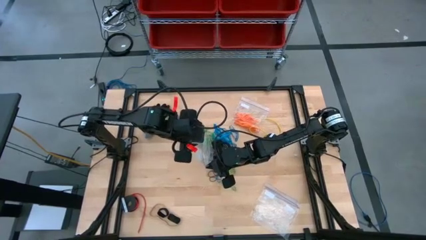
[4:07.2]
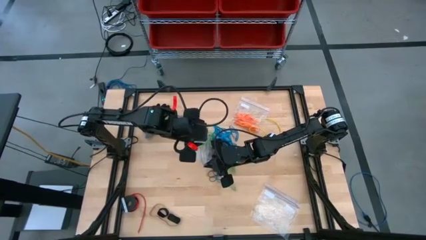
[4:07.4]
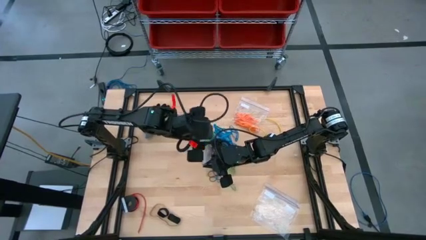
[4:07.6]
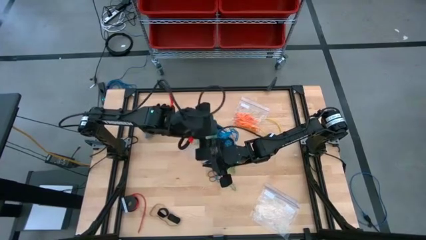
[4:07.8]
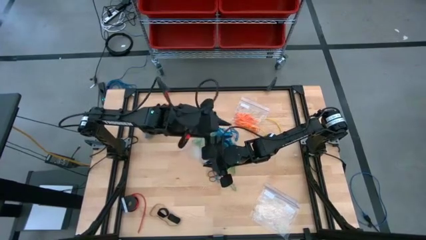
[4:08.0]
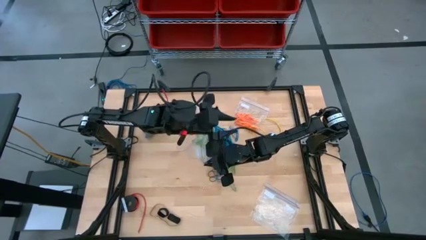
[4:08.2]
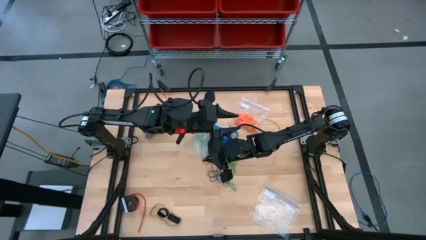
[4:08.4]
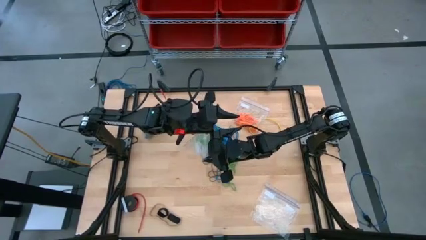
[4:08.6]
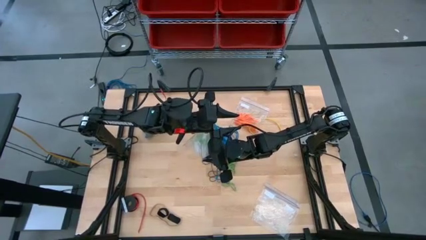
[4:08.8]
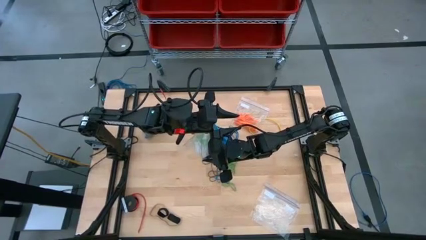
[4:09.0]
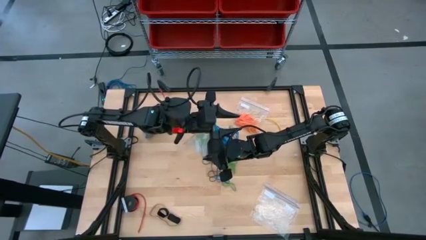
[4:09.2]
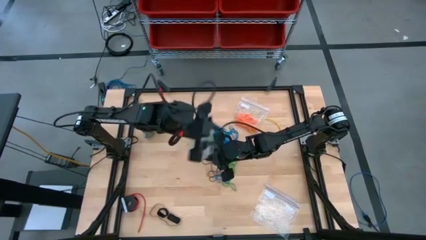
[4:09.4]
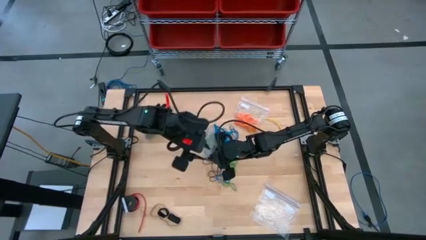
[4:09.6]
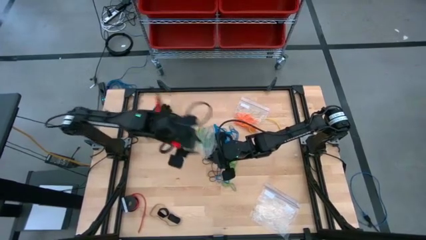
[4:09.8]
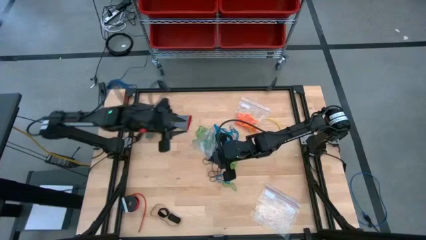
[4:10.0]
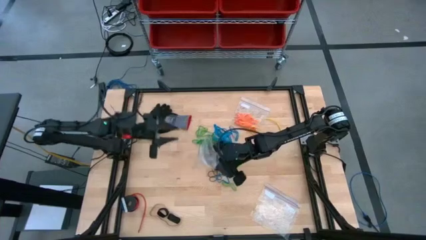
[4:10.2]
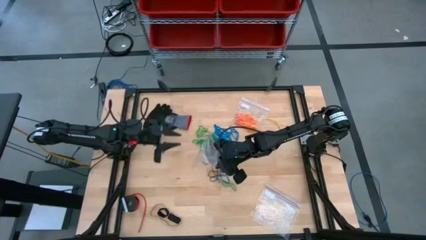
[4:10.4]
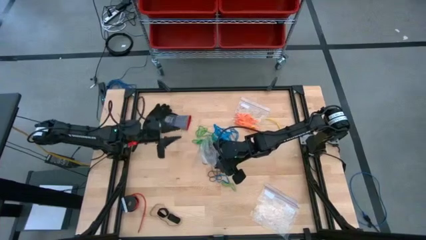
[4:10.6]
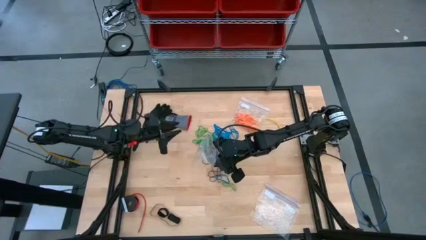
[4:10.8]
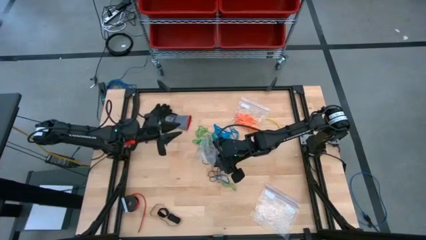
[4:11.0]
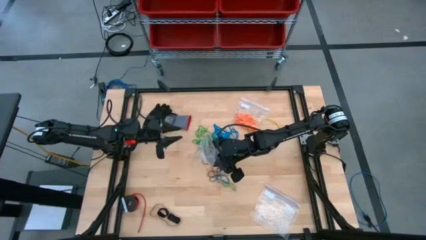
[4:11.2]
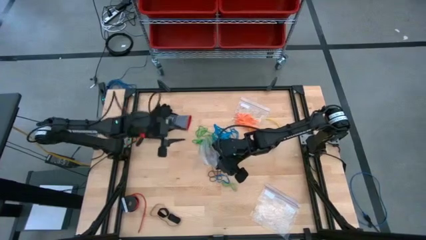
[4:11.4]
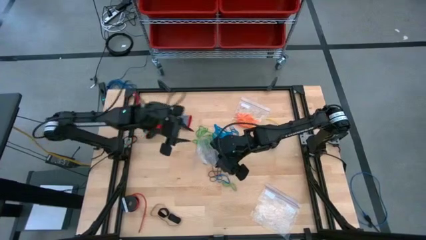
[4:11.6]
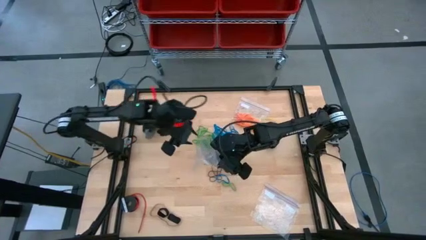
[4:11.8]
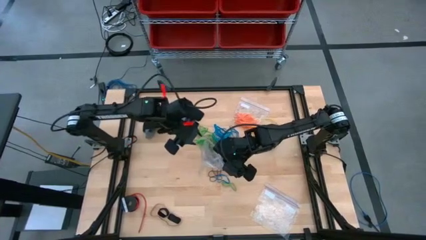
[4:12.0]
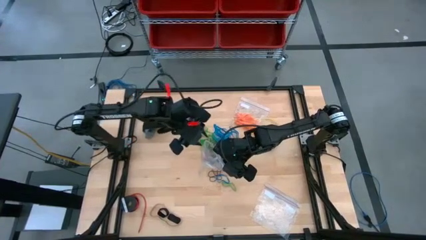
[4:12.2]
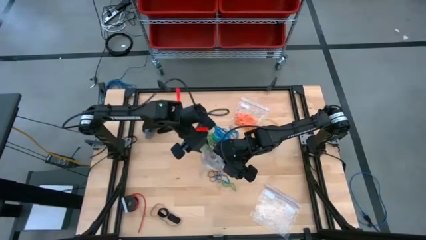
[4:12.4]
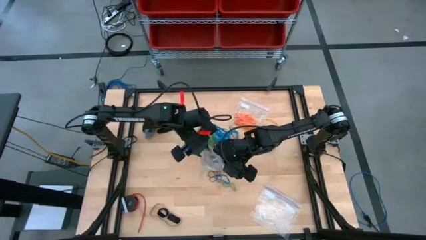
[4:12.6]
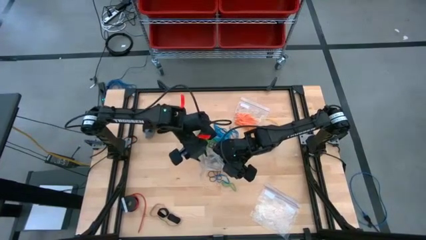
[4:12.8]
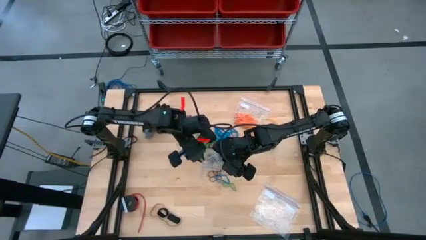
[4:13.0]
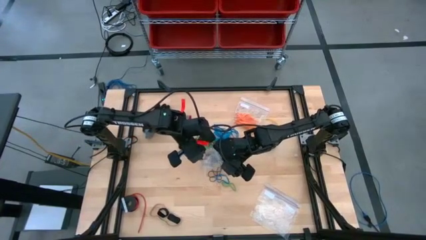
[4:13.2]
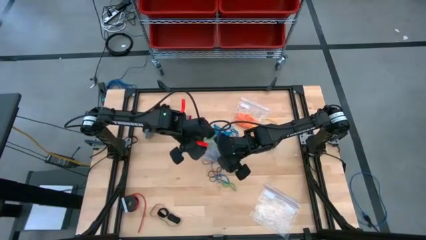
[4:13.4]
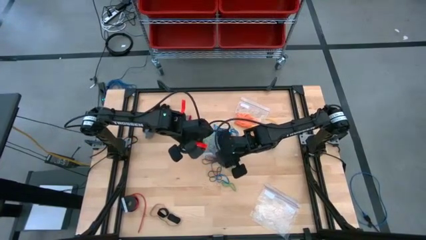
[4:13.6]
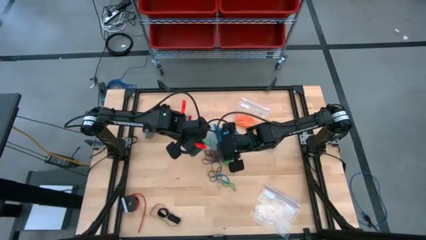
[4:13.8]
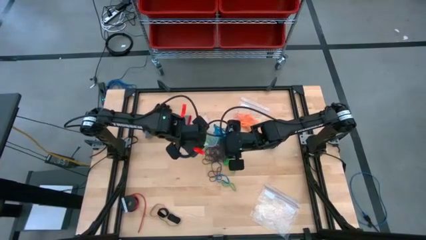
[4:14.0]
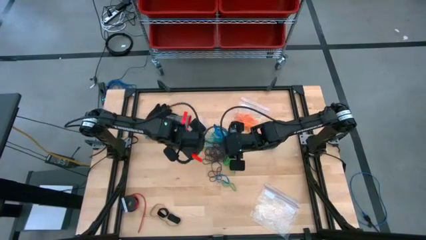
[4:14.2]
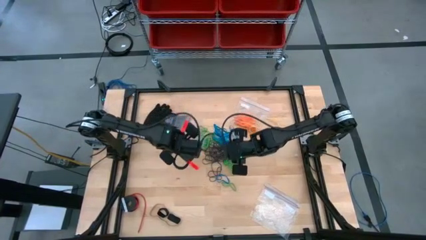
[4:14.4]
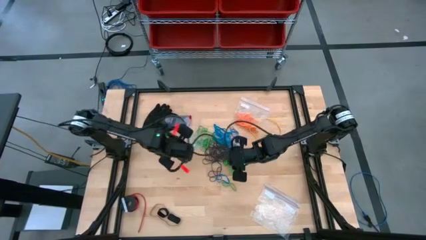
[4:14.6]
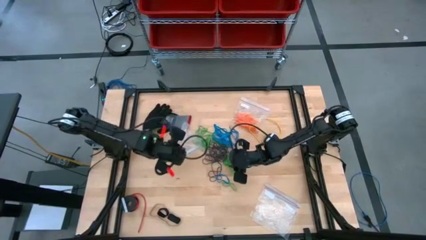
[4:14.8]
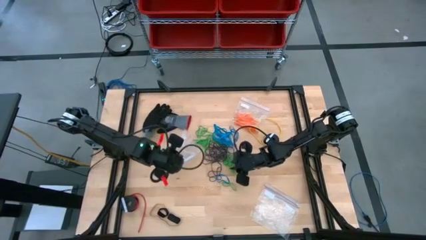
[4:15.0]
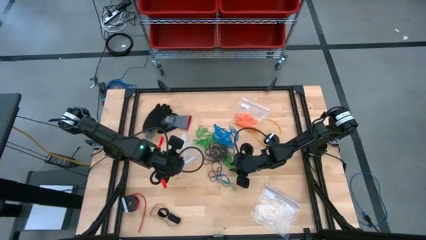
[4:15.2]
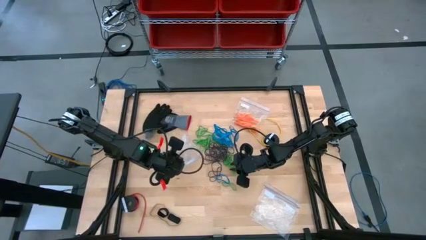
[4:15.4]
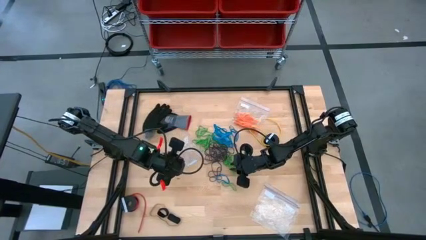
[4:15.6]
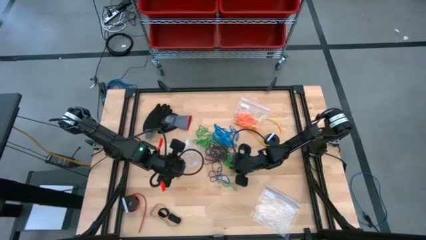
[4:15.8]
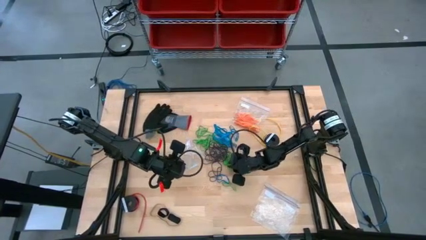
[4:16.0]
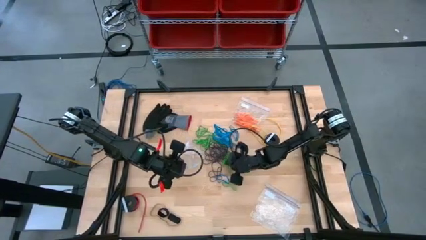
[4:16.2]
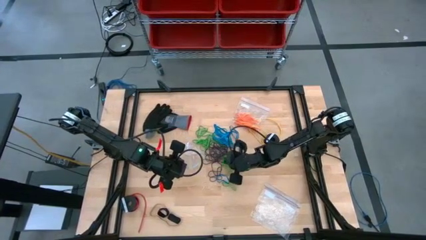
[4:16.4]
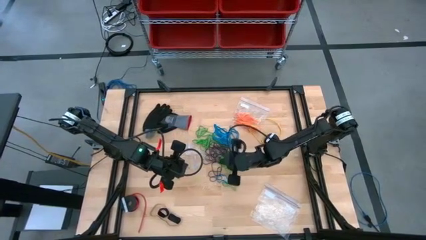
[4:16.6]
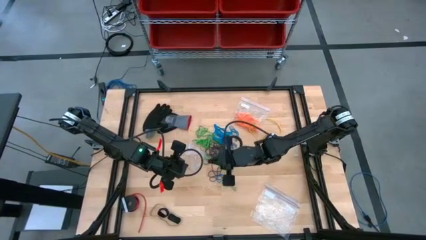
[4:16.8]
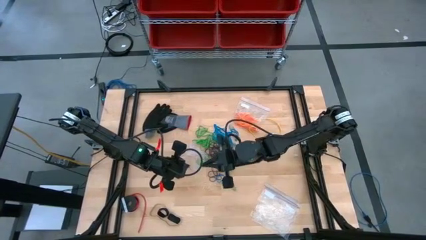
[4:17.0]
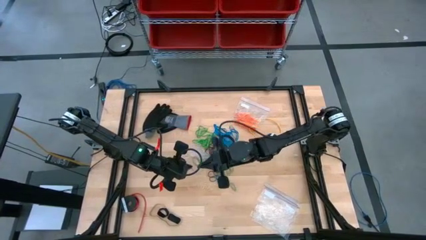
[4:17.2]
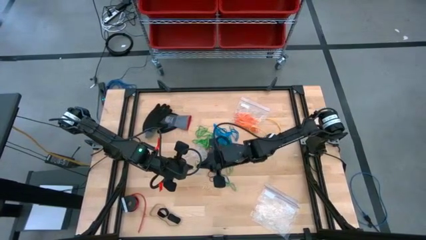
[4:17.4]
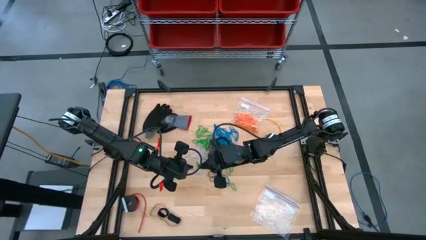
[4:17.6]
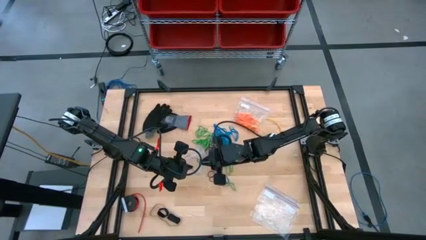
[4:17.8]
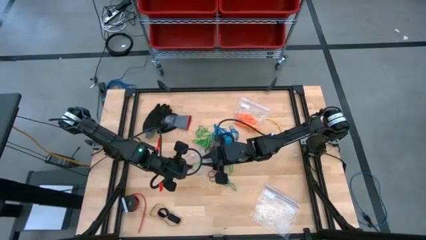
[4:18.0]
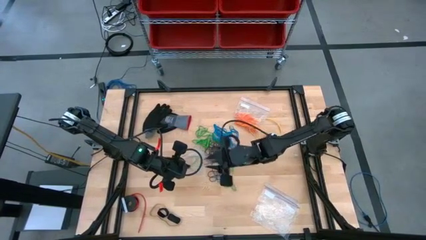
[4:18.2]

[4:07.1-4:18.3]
Task: Sort rubber bands
Put the green rubber band into the transparent zip bag

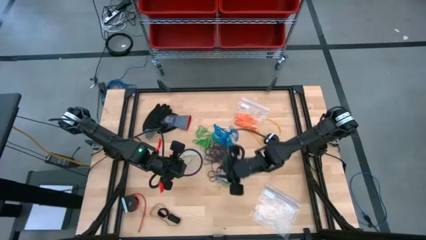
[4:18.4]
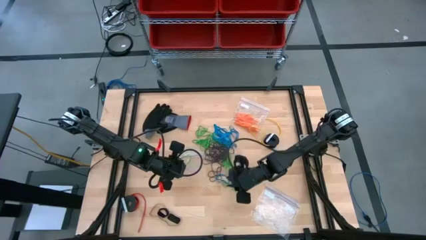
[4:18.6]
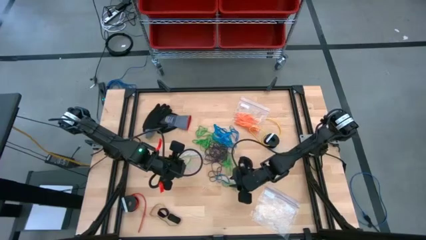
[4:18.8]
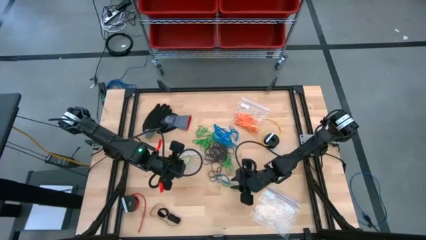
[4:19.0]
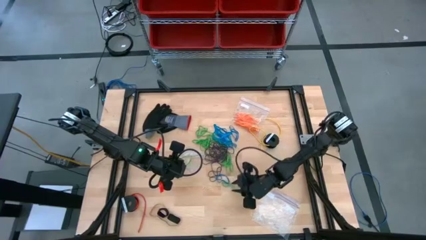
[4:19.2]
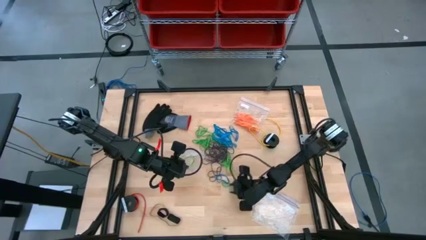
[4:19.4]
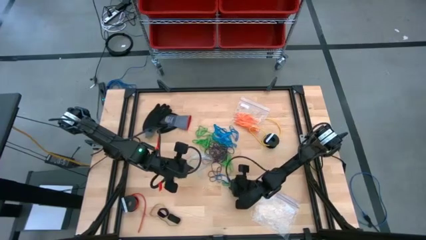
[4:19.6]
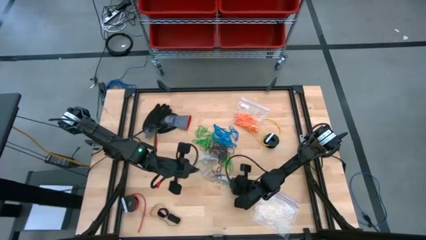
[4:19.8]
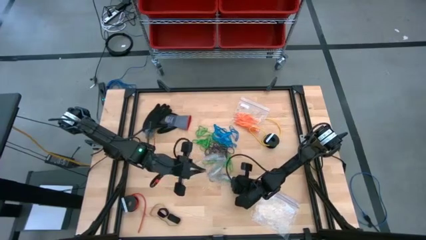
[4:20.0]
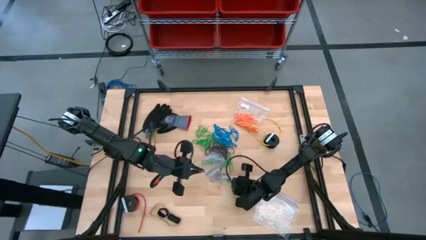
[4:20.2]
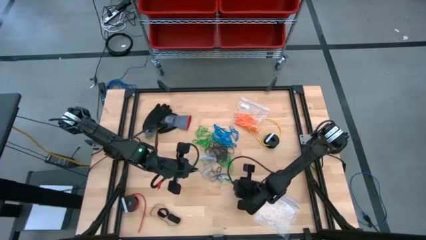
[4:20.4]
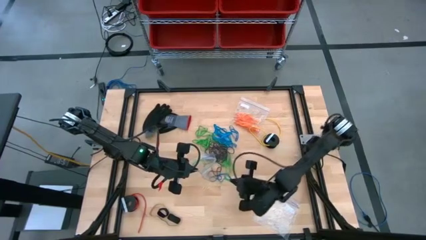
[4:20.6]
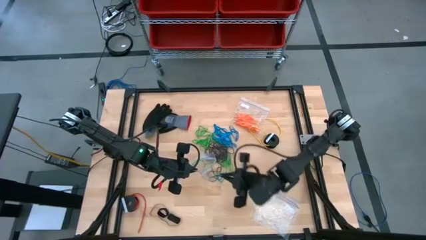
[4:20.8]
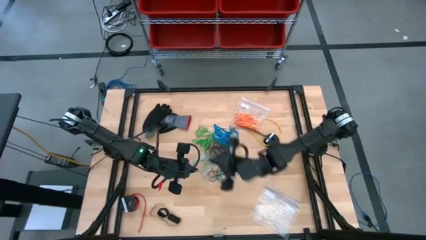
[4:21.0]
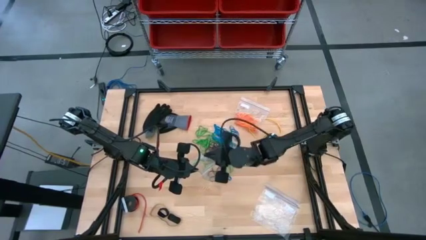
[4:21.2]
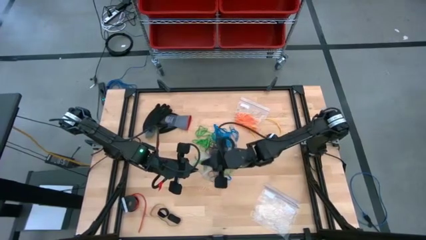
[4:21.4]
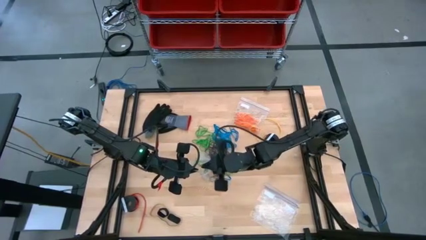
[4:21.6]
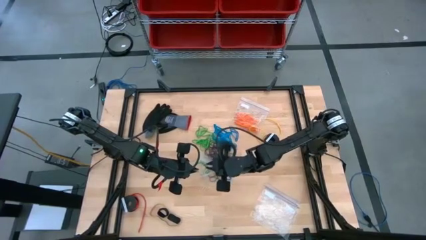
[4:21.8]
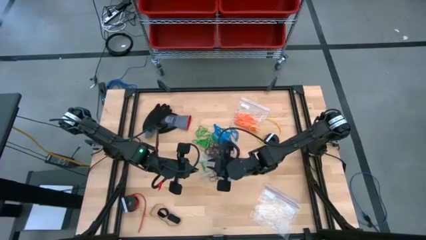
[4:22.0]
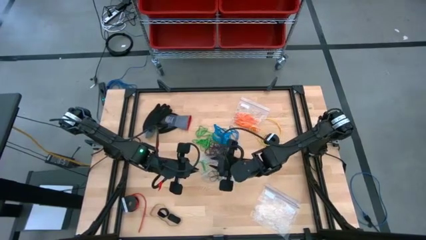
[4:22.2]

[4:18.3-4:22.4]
Put the green rubber band into the transparent zip bag

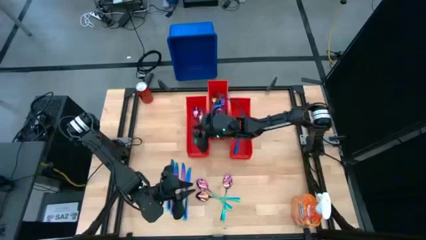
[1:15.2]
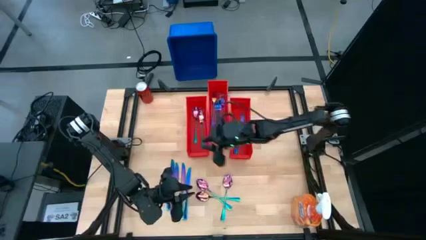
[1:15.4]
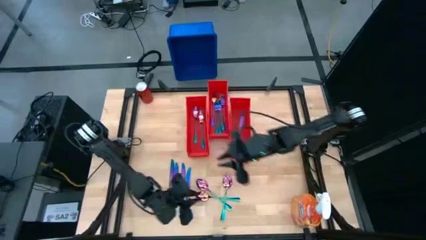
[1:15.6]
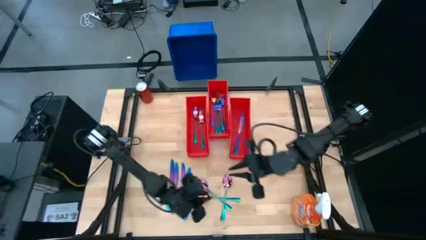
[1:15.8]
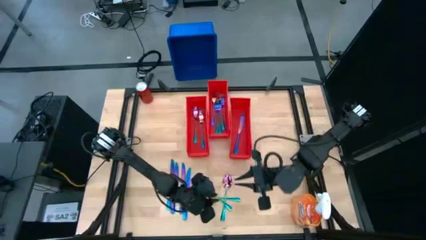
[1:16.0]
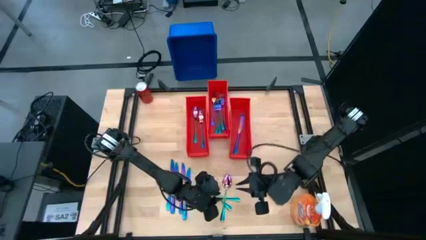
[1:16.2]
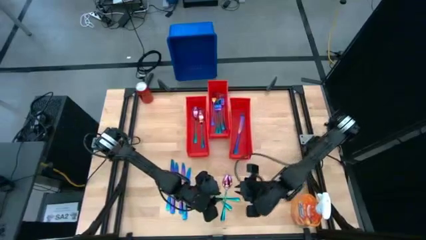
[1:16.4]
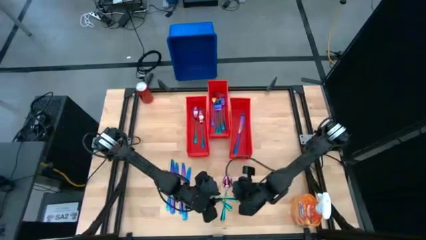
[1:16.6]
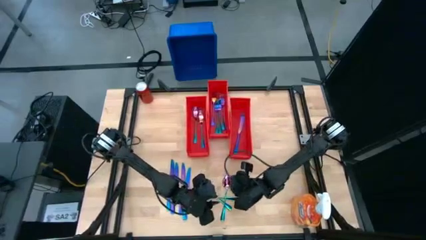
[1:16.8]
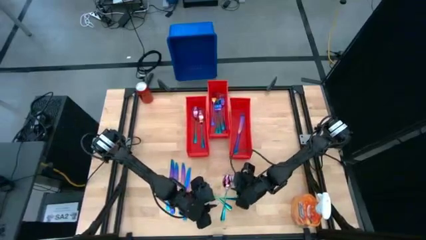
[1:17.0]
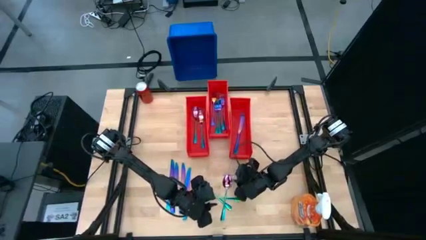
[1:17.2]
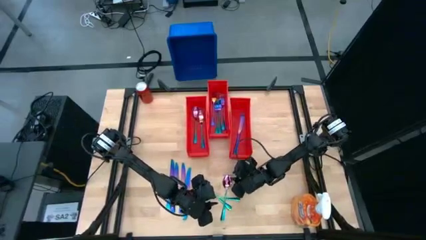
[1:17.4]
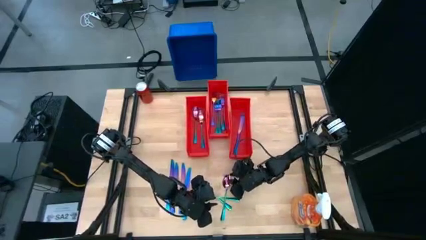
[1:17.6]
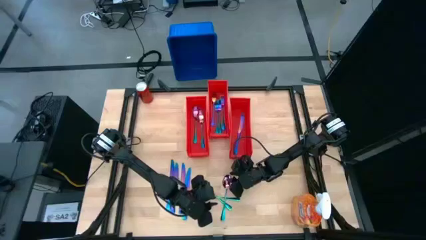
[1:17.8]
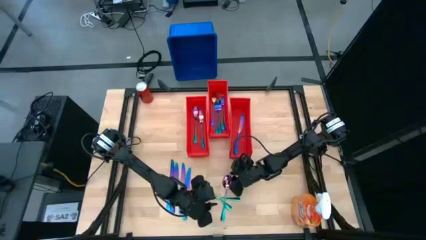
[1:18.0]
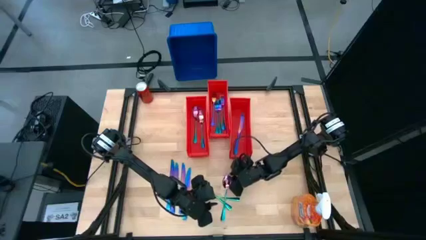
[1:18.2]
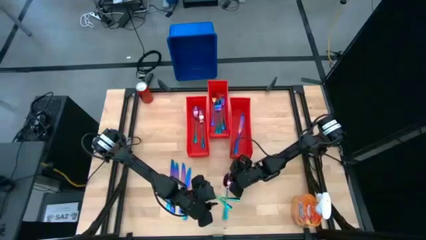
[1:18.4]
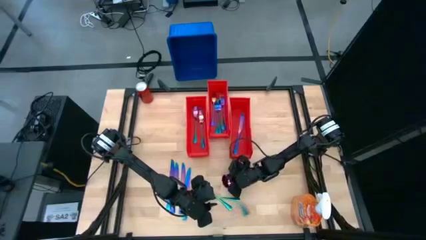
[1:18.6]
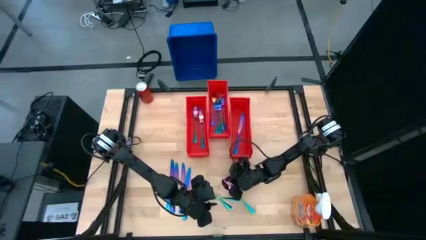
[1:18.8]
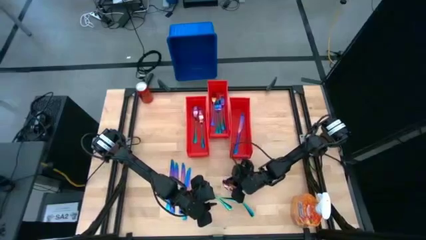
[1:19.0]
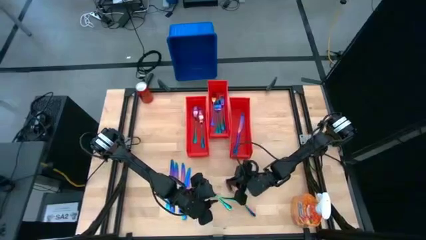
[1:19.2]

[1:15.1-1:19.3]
Task: Sort silverware
Put the iridescent spoon into the left orange bin
